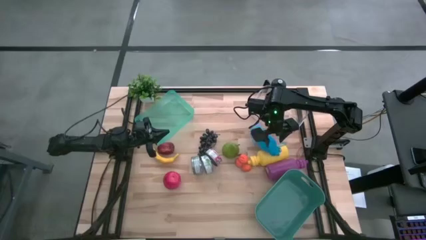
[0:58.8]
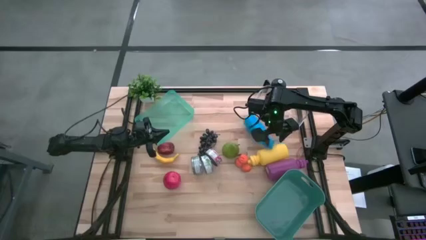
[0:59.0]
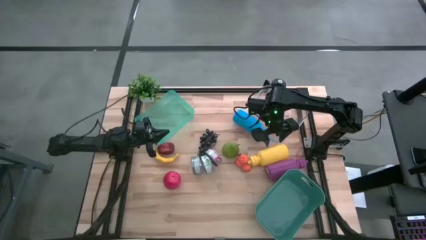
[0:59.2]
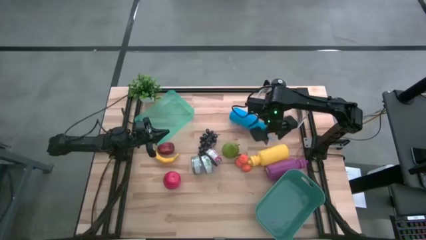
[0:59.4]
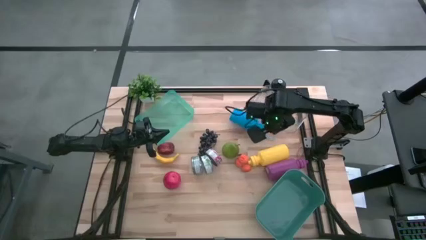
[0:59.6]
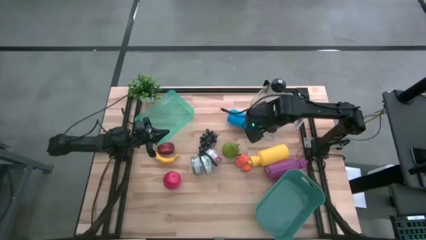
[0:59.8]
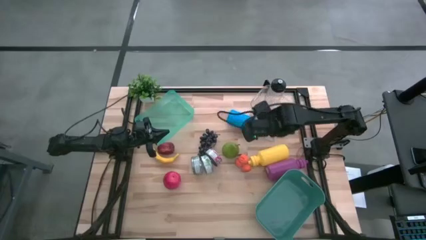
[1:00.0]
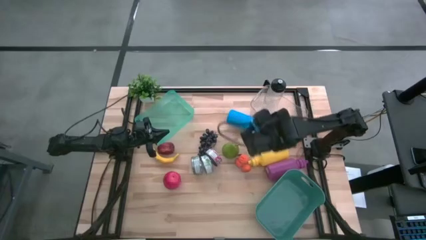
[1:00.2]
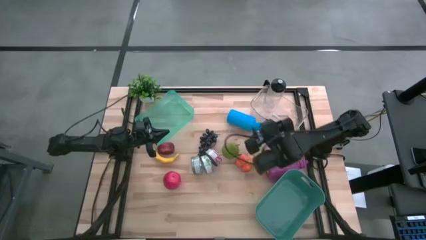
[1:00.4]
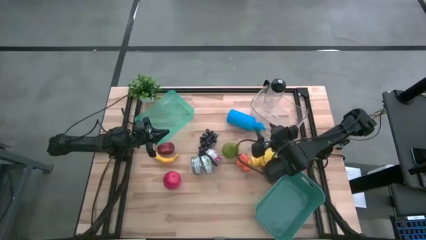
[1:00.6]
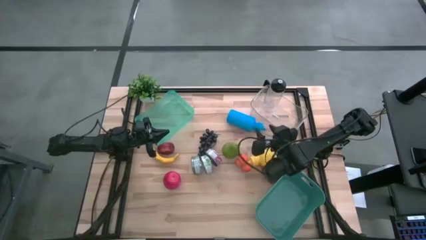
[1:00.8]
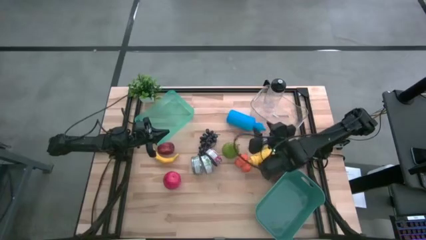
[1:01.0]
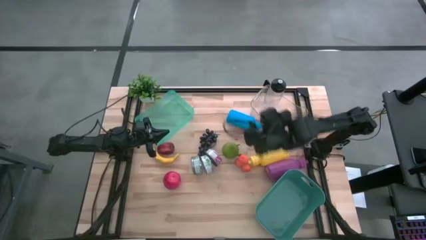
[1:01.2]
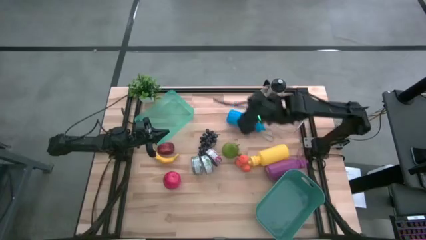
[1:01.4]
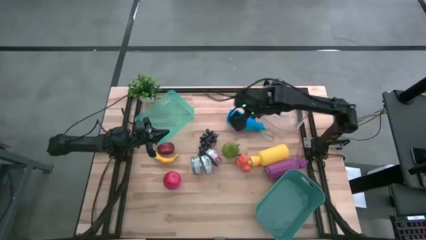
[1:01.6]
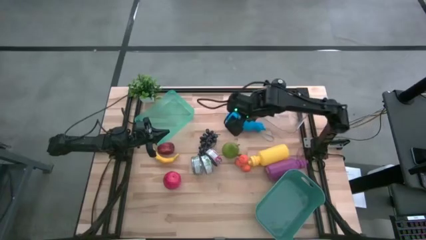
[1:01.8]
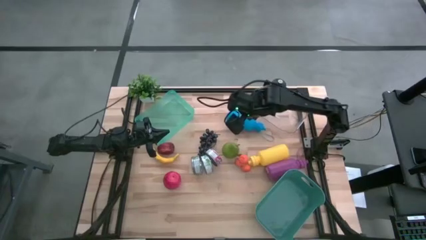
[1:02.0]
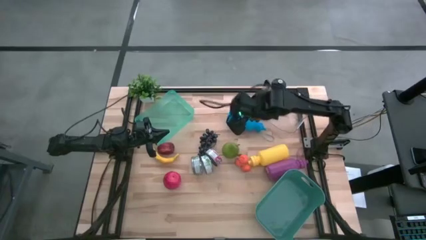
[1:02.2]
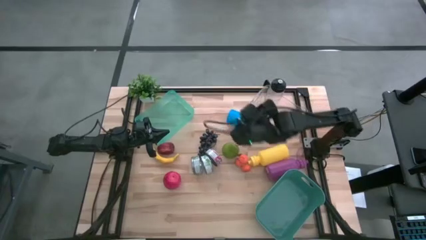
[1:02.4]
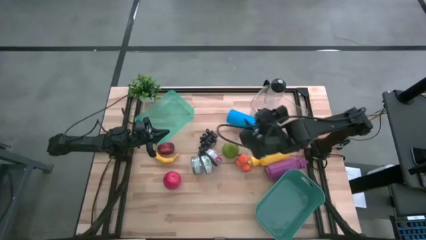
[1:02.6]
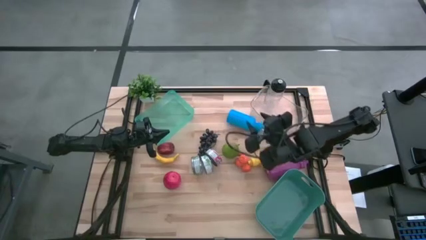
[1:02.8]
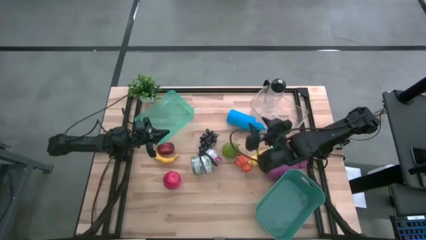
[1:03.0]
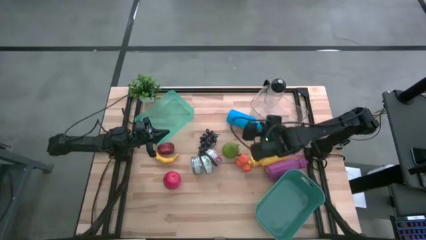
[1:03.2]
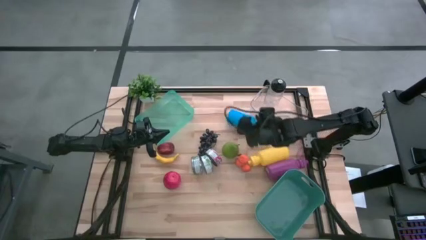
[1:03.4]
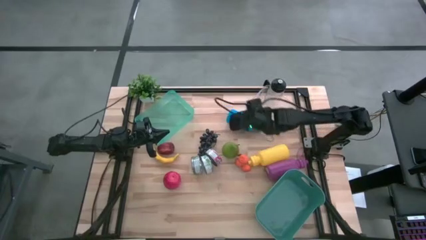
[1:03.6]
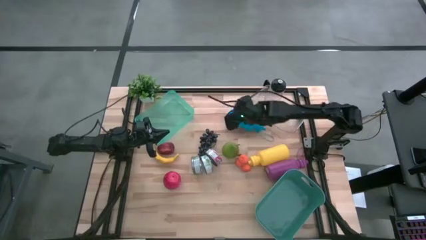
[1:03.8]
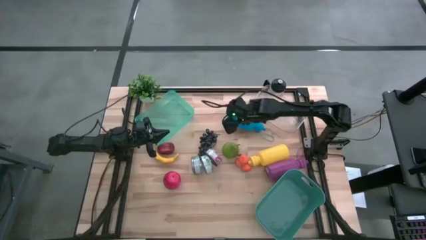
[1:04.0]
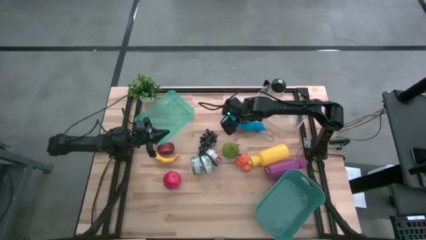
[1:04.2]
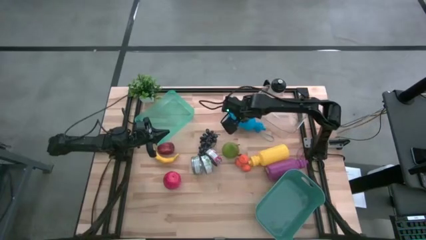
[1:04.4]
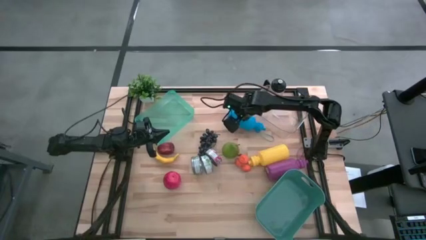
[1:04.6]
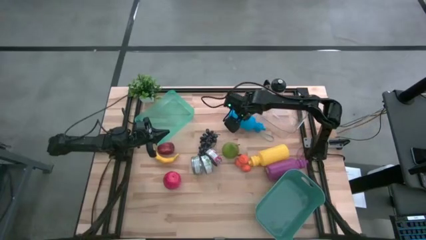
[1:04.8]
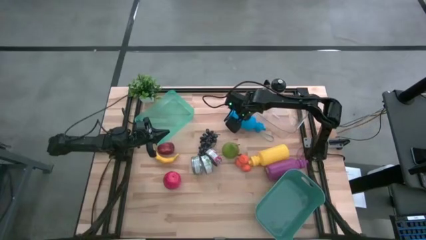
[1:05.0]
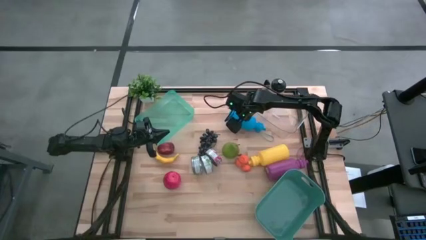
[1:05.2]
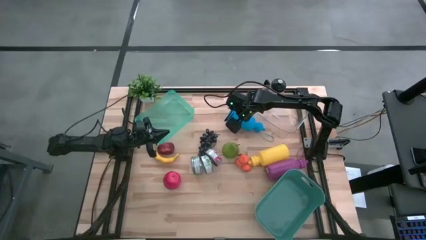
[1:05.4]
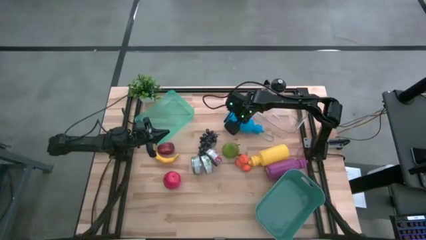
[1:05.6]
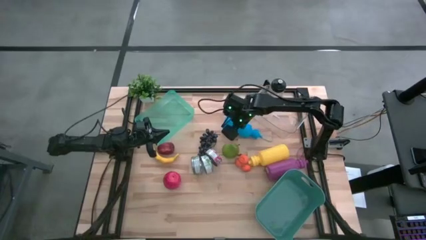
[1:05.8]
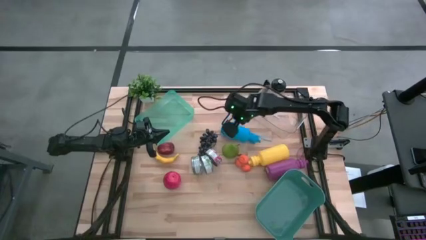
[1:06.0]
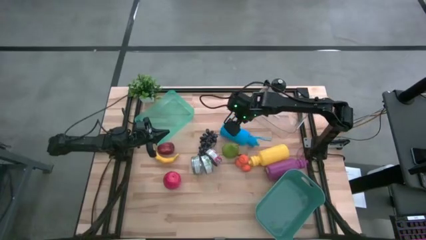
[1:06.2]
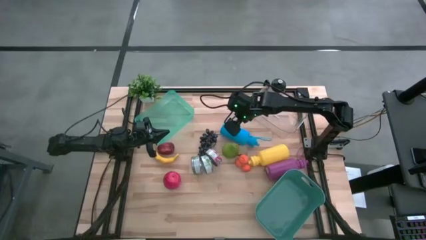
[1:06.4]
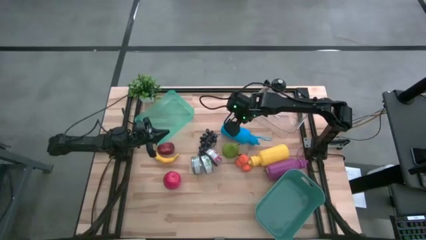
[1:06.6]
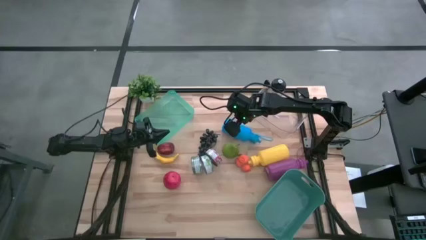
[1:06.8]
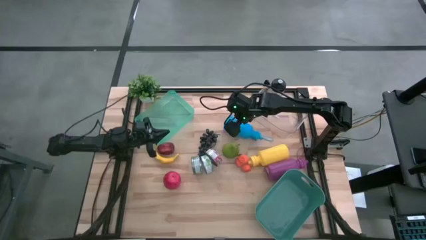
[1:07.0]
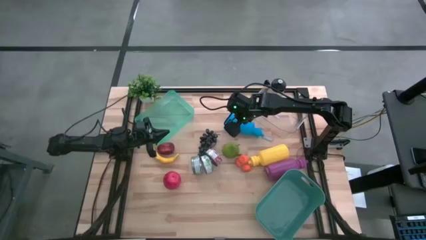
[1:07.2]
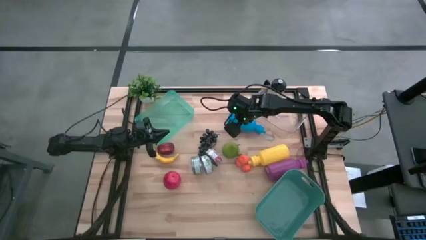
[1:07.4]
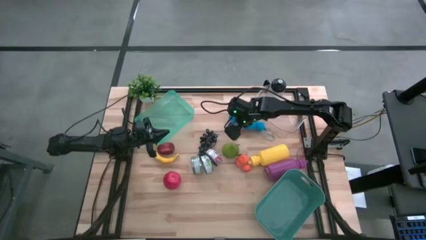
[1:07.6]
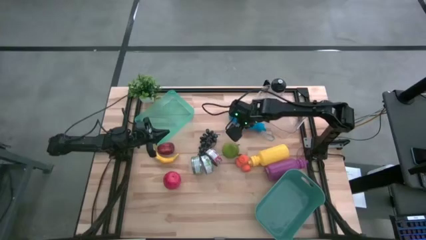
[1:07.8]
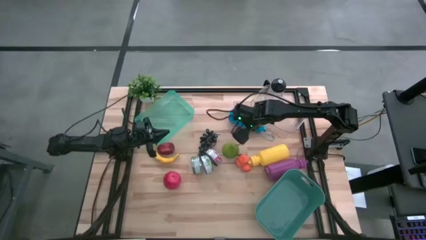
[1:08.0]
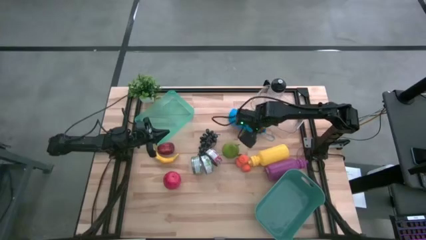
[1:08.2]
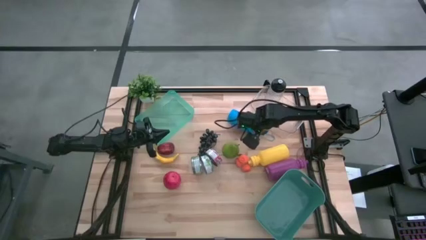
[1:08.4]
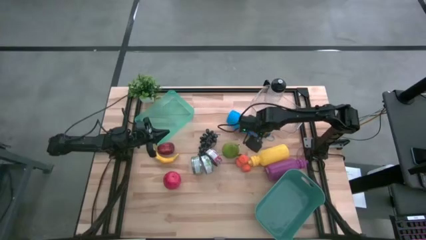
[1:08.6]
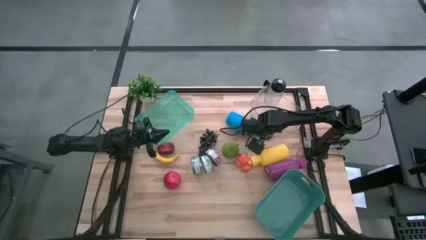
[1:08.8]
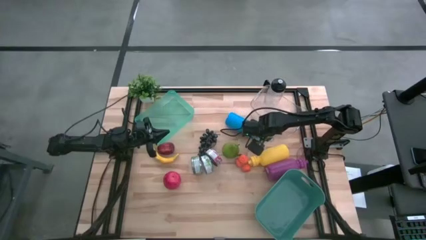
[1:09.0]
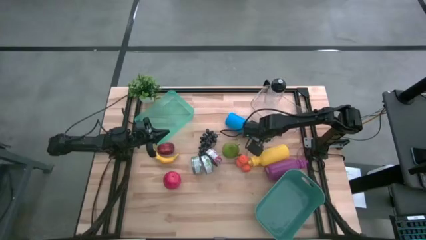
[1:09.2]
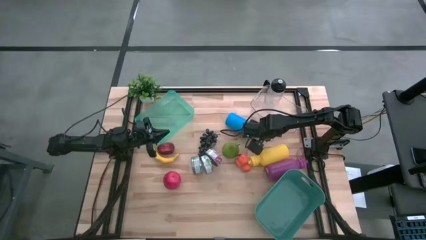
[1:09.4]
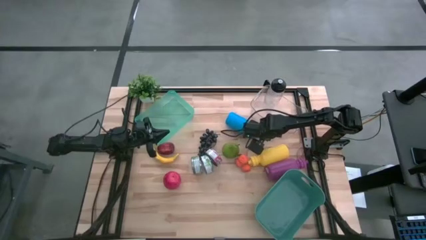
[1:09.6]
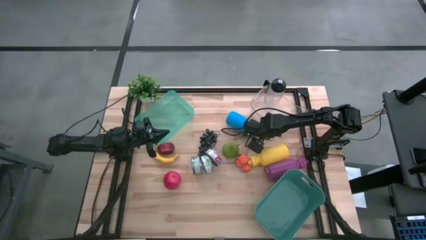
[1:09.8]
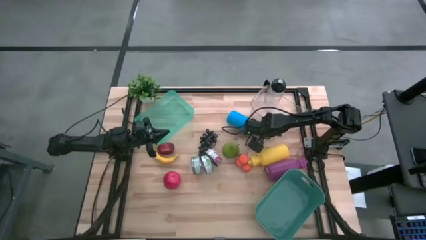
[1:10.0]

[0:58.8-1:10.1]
Task: Pick & Place Food Item
Put the blue water bottle into the transparent bin
